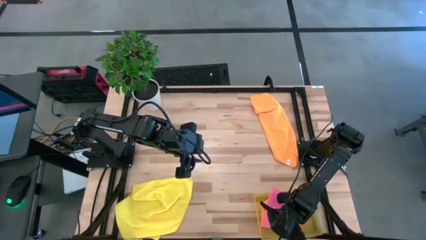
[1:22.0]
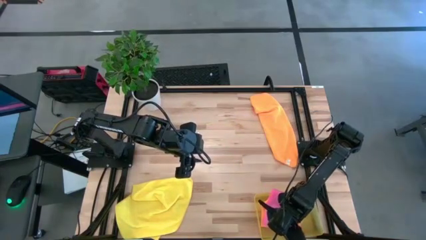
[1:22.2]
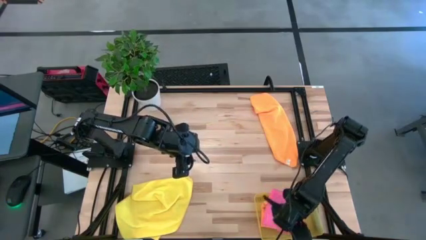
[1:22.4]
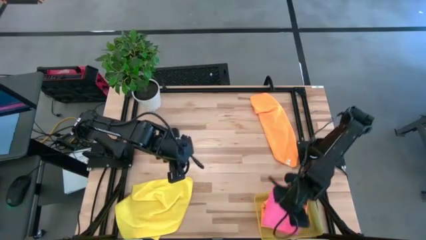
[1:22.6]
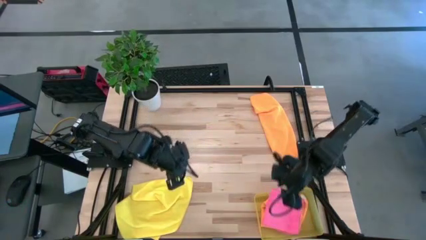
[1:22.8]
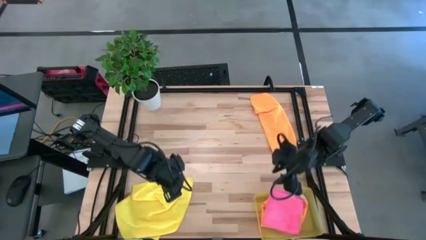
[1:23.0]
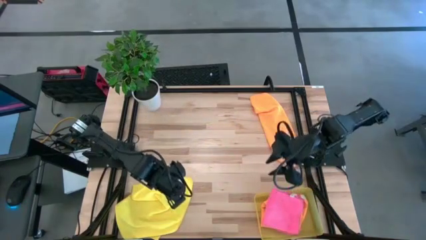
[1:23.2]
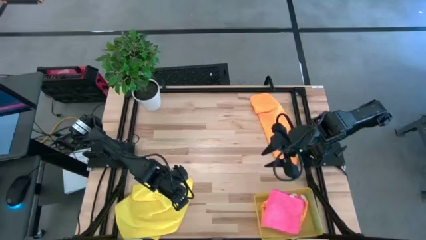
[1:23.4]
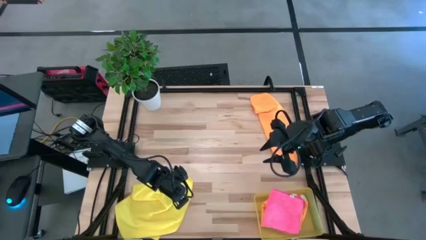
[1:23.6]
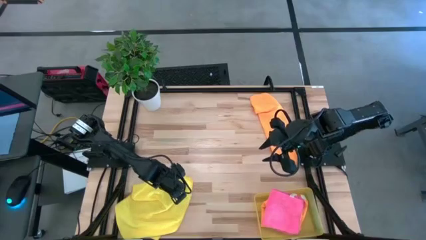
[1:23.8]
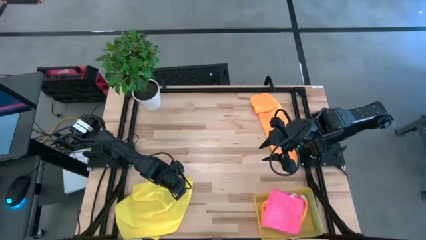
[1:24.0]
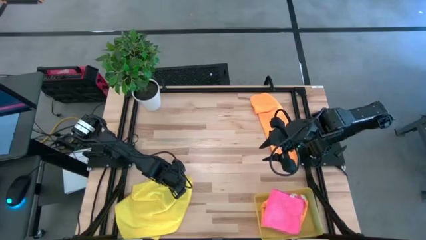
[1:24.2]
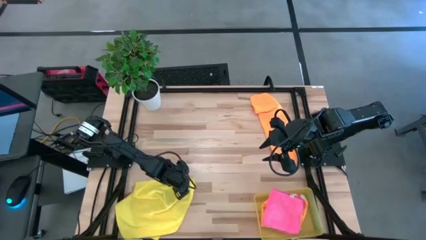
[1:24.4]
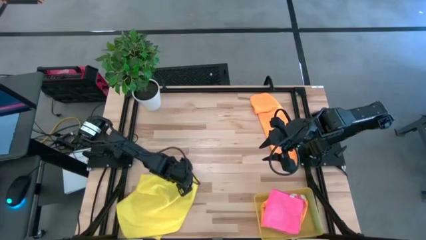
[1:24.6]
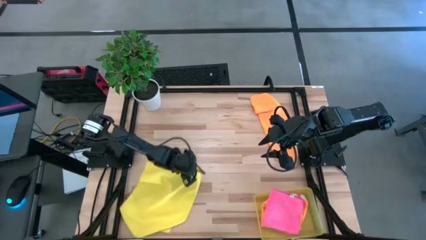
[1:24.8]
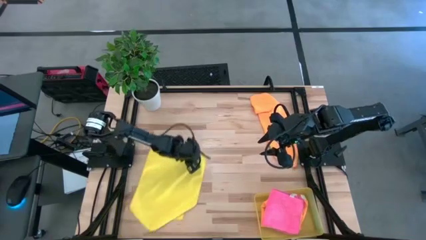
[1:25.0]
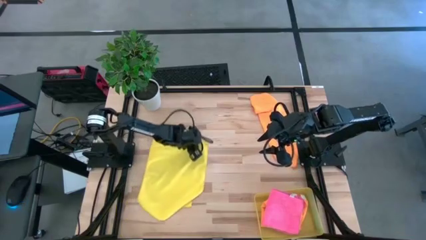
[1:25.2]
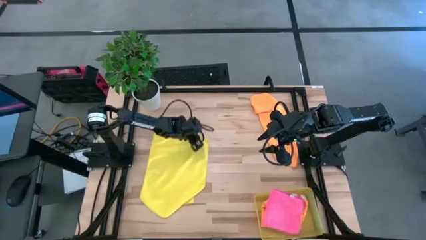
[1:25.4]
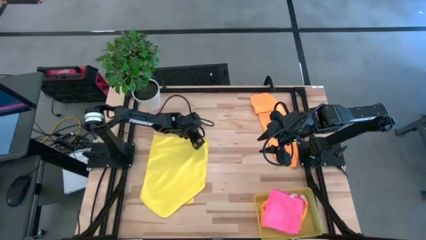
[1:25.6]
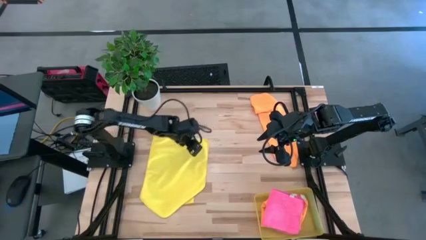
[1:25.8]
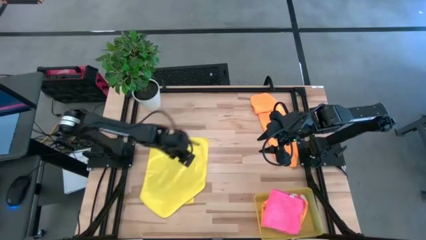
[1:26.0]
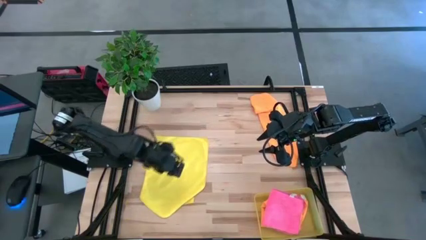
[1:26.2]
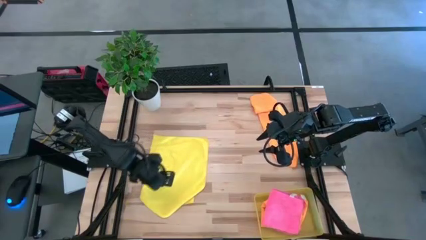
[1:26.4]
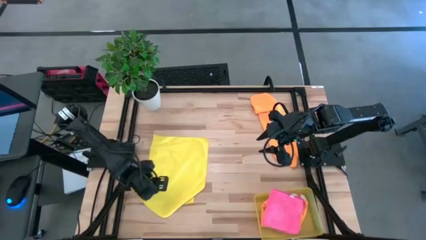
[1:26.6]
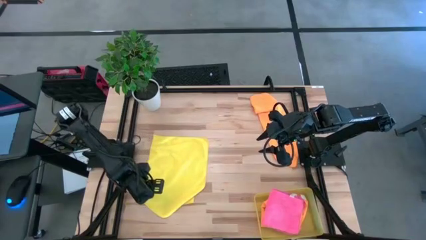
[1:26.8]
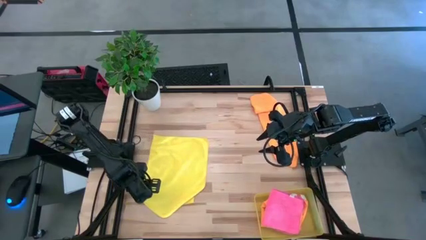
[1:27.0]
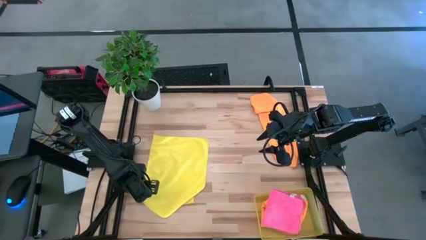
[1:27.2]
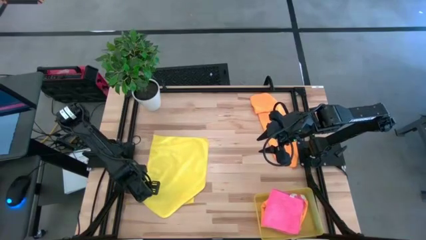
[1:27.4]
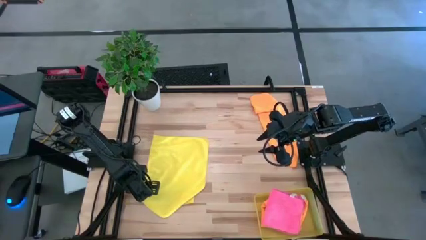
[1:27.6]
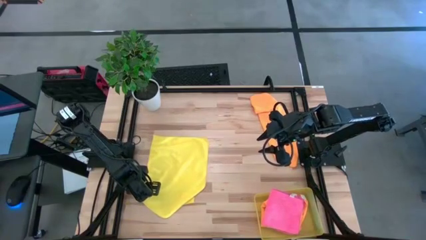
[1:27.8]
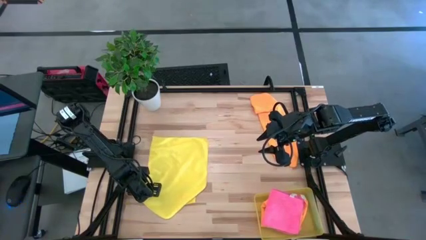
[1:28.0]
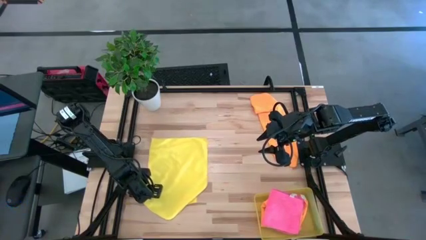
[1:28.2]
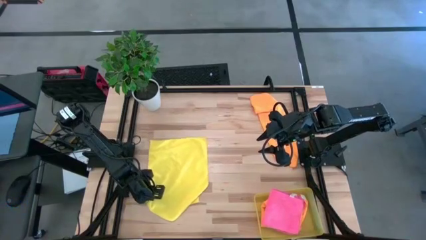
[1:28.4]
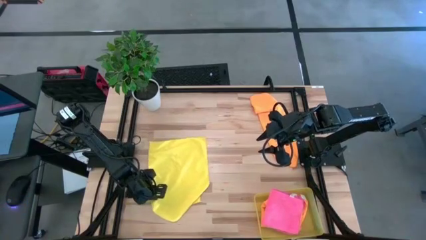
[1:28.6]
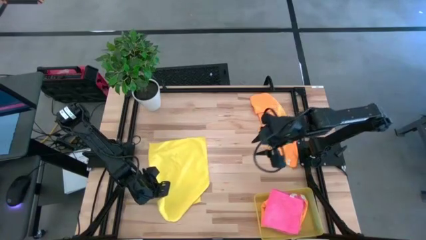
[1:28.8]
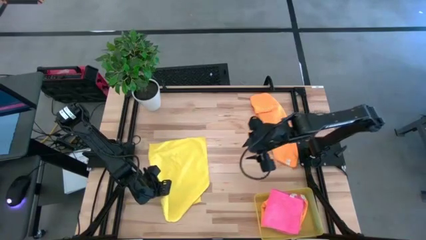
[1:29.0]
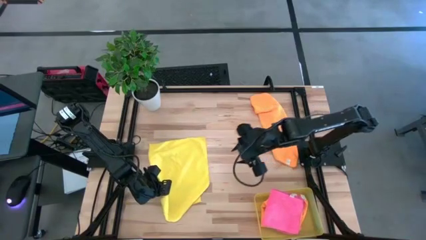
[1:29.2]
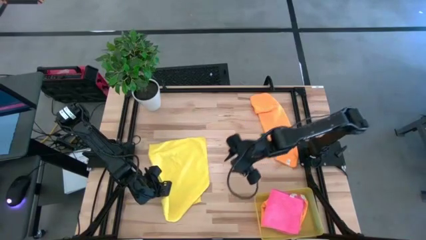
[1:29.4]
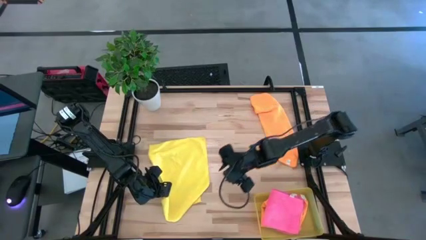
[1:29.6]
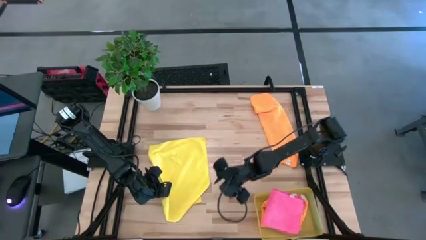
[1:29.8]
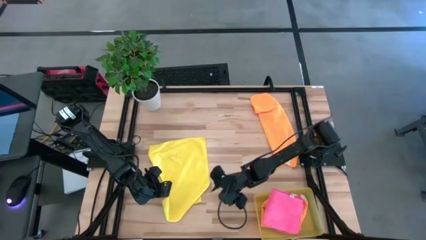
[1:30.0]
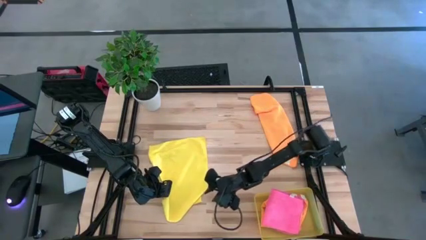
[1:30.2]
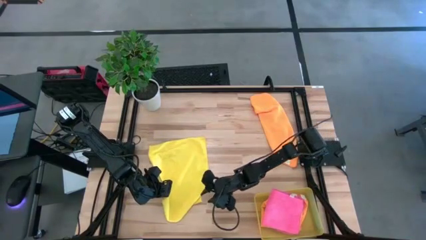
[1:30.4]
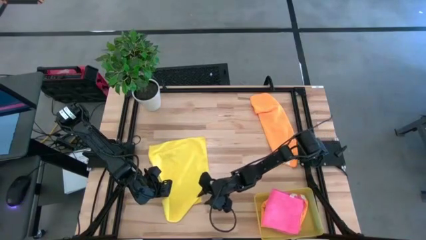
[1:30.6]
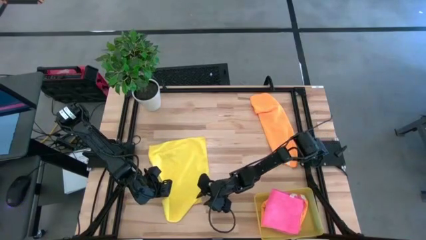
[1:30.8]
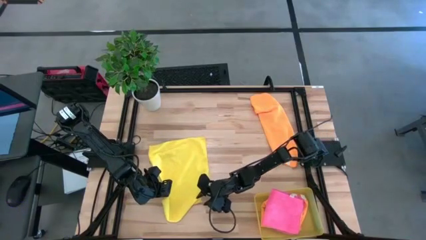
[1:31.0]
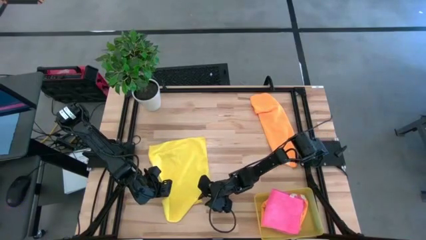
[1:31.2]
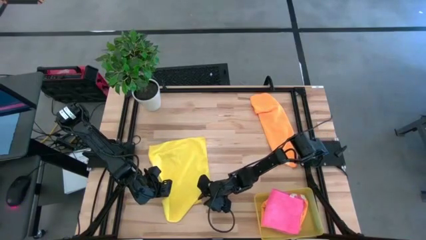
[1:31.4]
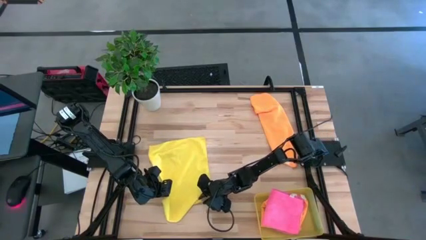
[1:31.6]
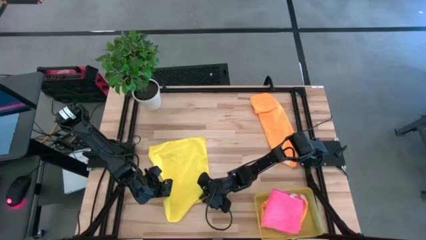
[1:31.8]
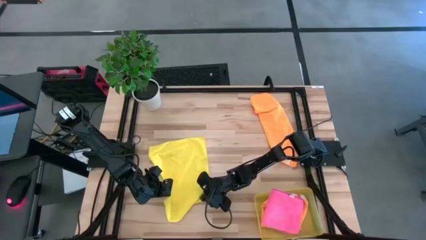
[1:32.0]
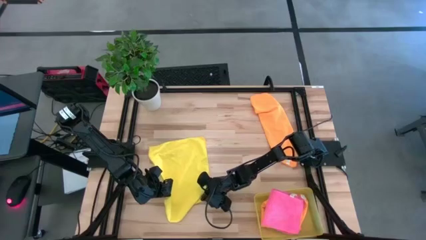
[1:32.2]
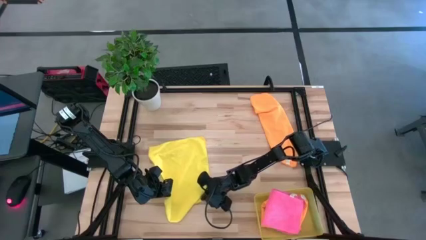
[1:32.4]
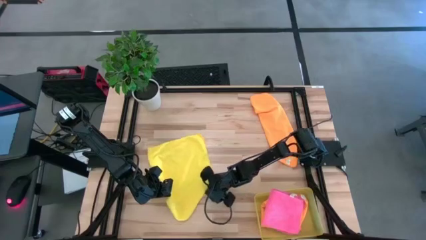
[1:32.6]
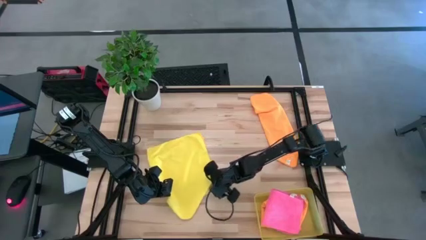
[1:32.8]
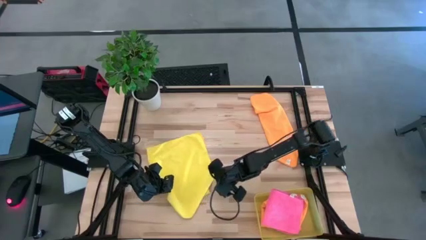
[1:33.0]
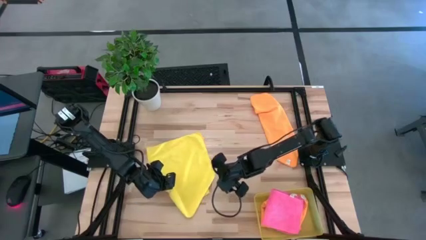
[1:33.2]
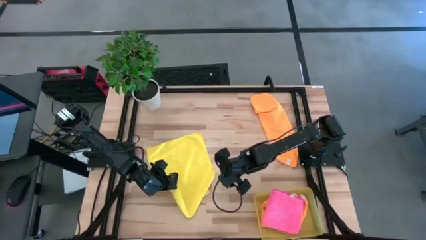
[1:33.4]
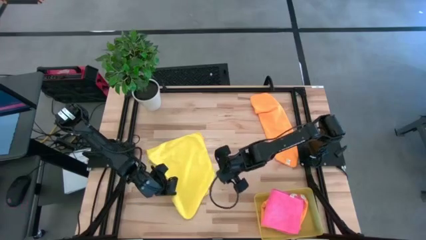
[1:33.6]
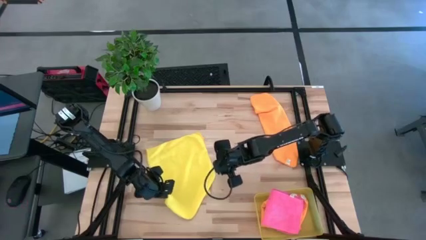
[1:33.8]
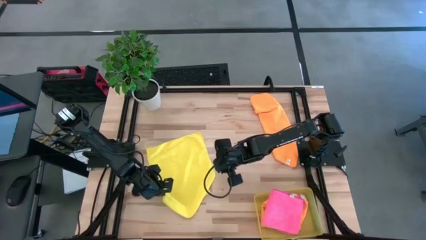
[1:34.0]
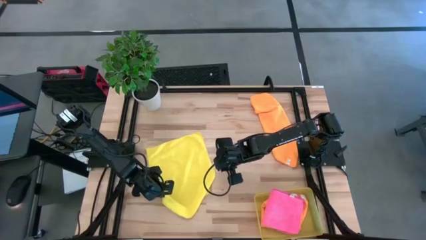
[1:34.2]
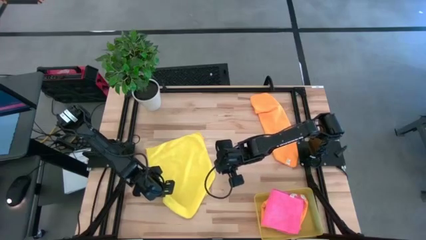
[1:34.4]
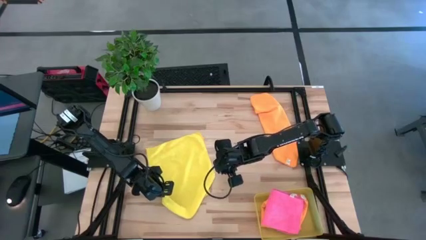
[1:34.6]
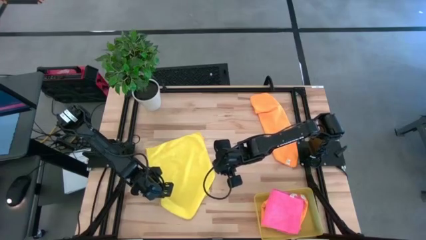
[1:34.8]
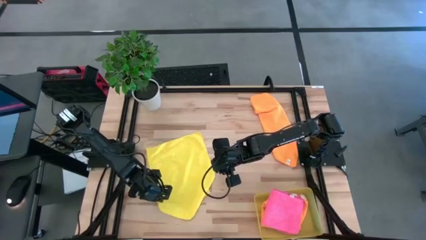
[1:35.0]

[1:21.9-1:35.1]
Task: Fold microfiber towels
Fold the yellow microfiber cloth
